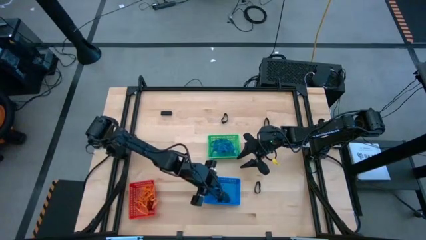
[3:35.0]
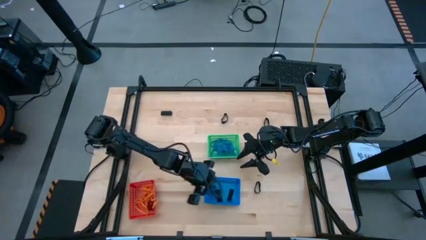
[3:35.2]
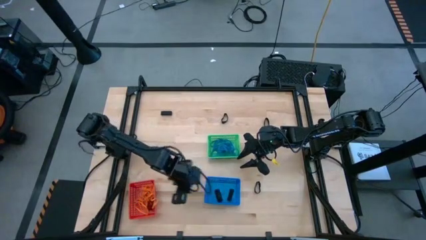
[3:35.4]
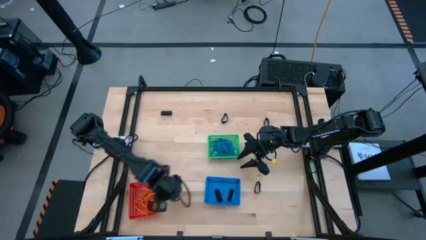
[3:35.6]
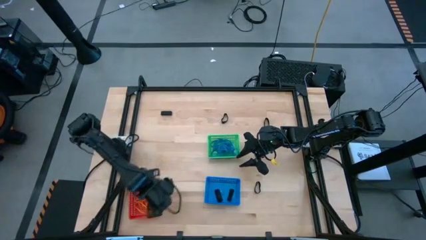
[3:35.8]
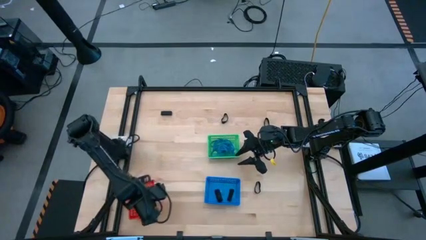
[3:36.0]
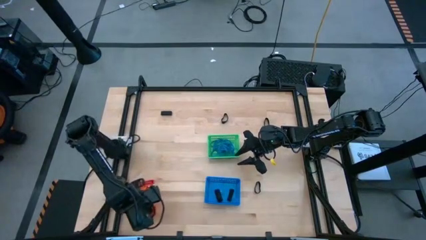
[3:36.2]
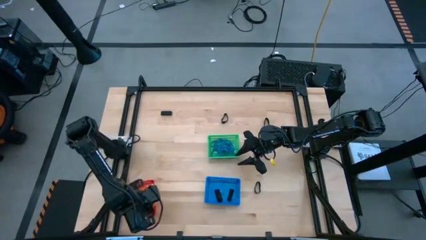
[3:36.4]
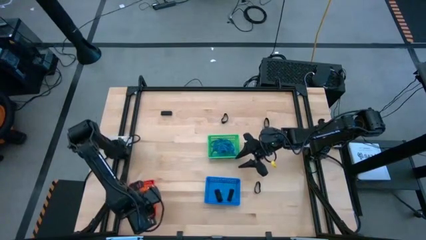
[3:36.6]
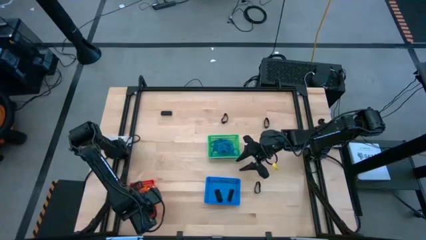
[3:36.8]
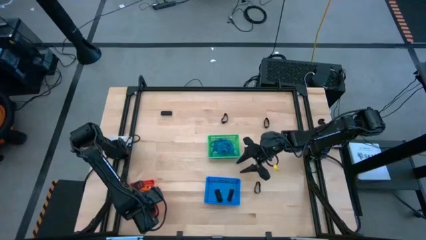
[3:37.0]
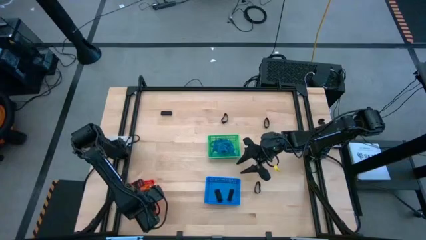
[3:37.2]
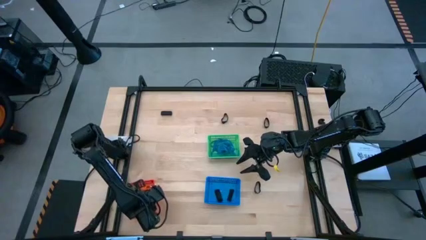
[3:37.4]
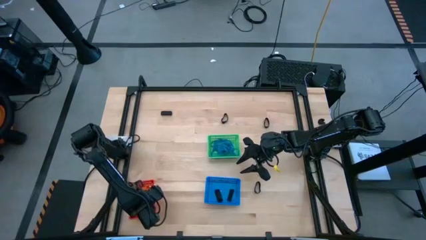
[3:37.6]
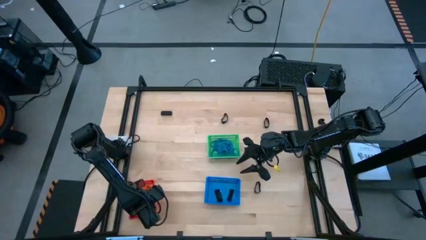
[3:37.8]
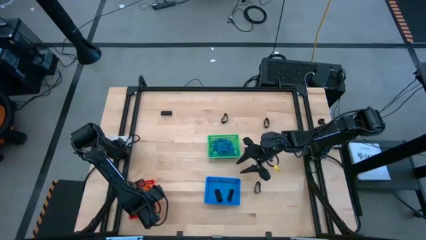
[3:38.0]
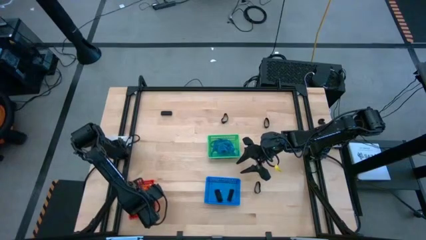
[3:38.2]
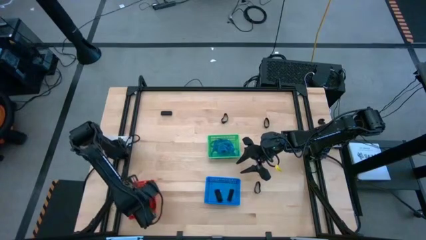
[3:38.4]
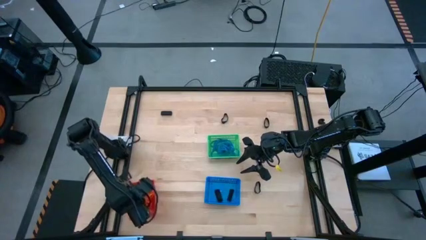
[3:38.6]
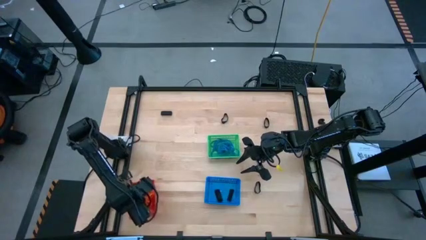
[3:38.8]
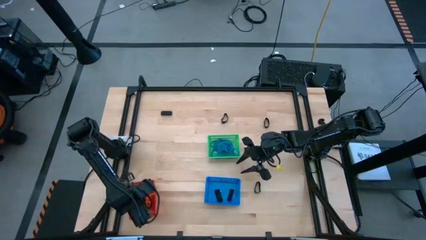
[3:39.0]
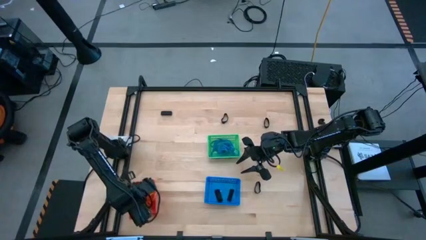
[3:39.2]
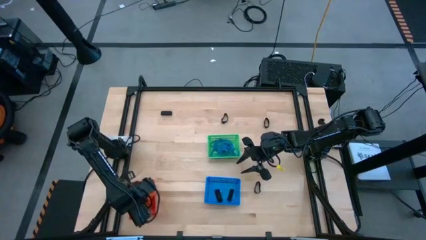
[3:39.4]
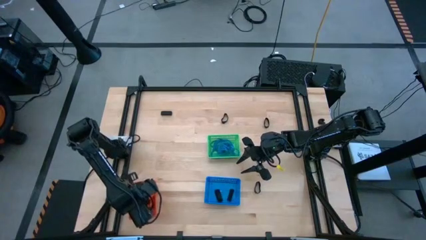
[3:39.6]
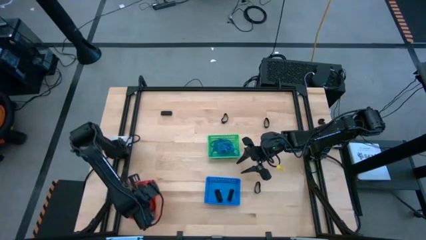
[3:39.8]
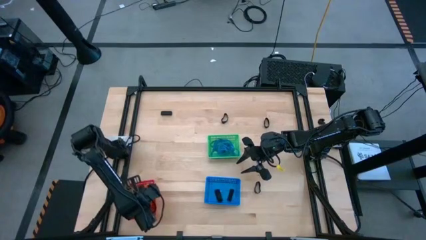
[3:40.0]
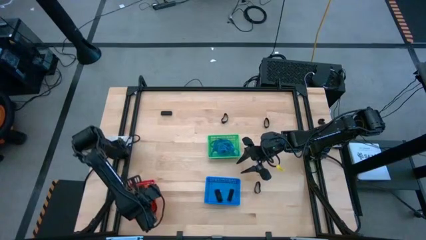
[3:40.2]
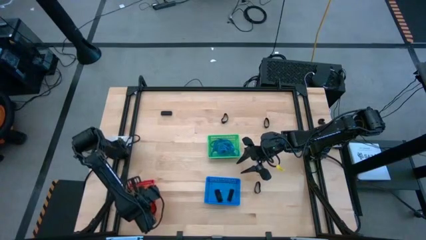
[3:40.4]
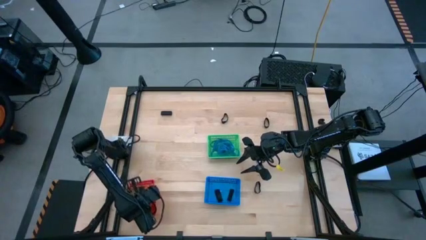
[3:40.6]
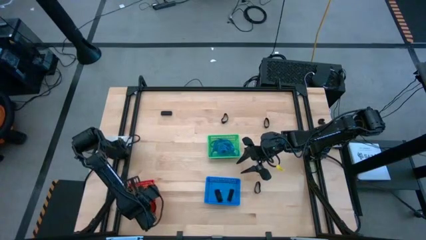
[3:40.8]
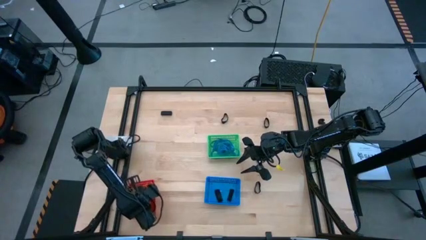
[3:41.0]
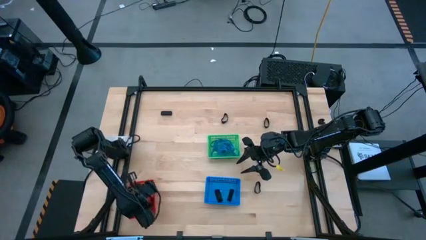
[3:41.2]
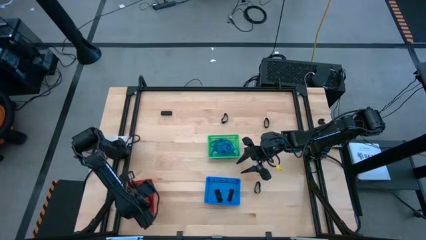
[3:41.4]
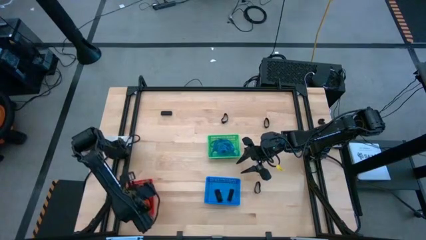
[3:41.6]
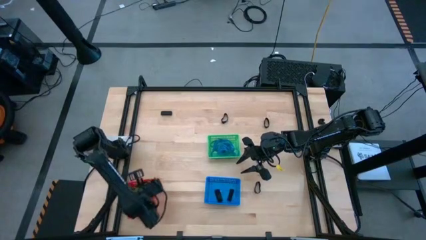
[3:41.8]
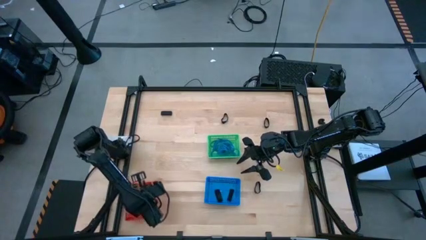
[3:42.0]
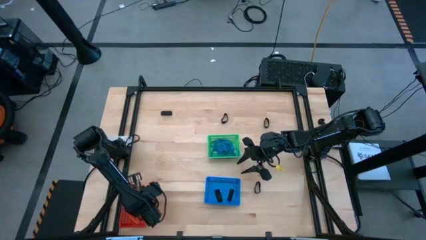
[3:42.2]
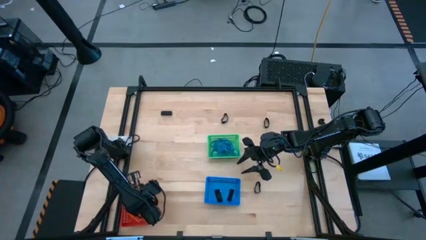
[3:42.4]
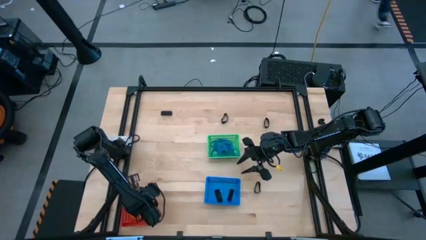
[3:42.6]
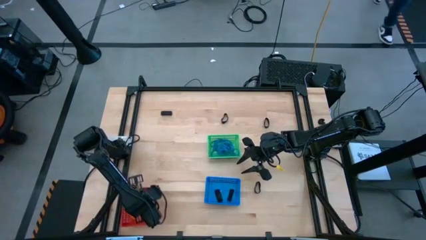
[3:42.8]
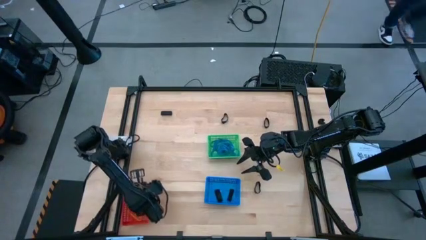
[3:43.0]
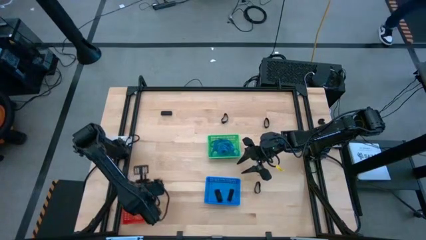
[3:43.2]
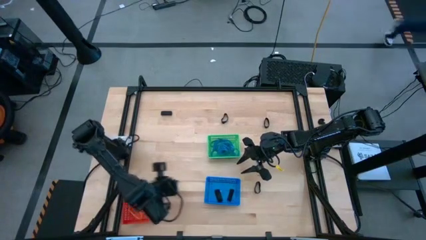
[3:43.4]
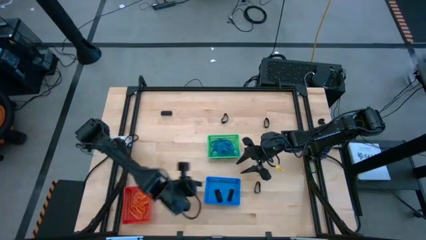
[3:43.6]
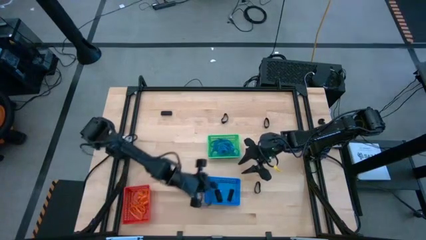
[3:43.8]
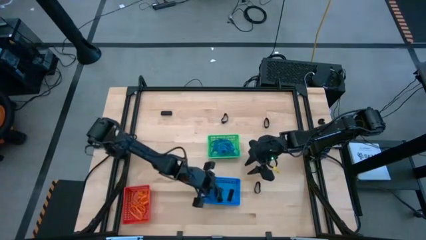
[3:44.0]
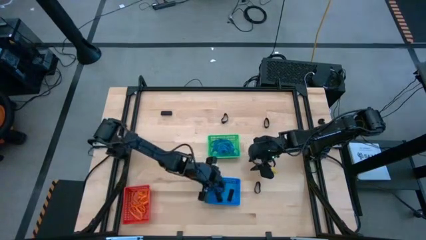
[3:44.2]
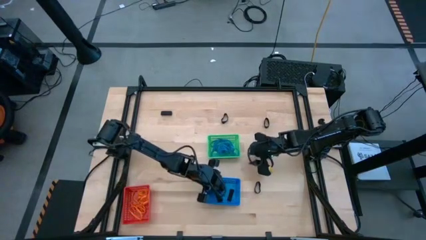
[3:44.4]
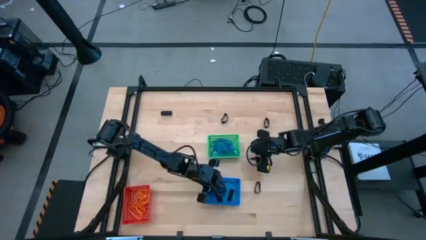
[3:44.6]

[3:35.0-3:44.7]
Task: Sort rubber bands into baskets
Put the black rubberband into the blue bin

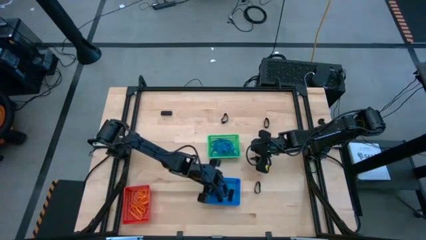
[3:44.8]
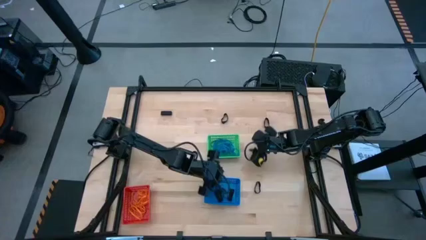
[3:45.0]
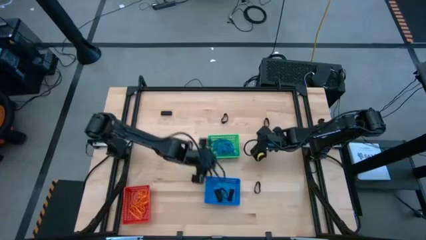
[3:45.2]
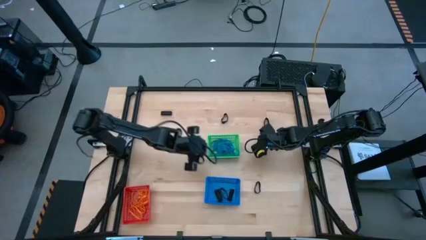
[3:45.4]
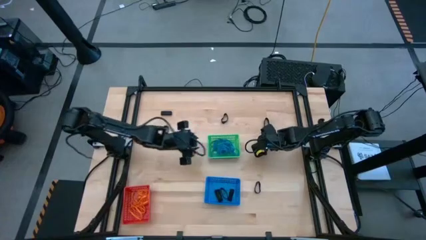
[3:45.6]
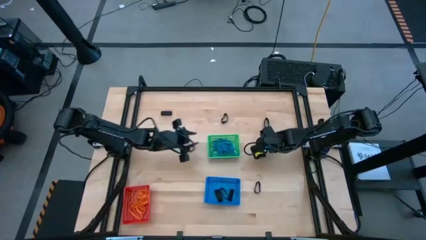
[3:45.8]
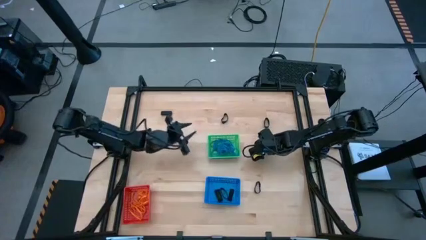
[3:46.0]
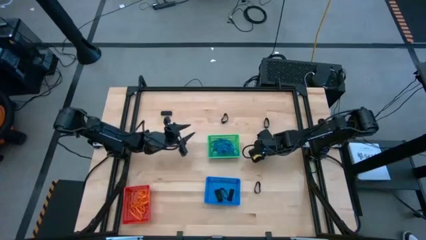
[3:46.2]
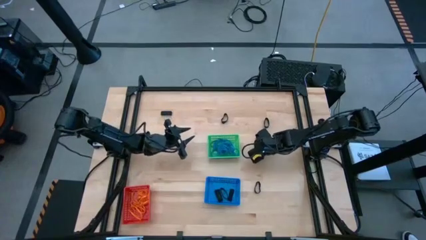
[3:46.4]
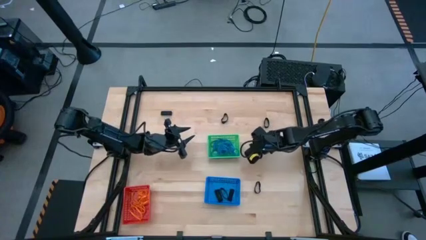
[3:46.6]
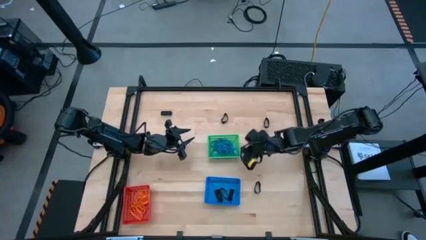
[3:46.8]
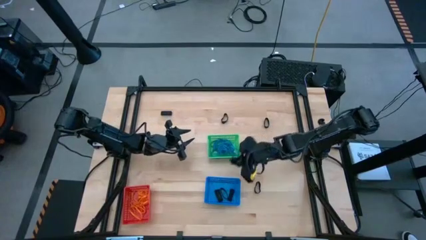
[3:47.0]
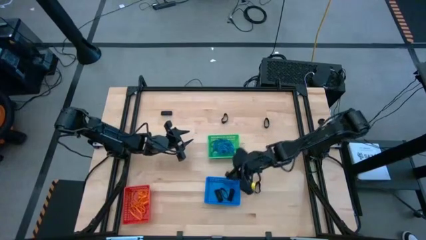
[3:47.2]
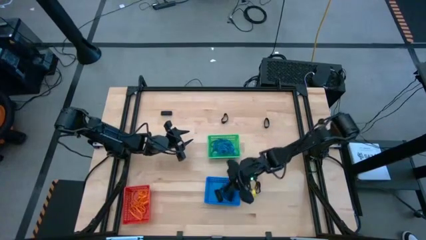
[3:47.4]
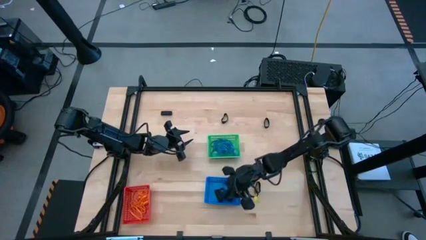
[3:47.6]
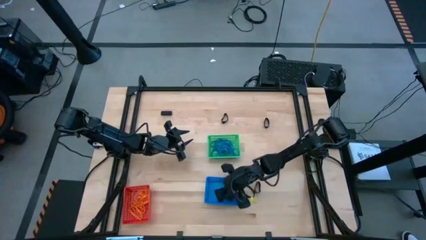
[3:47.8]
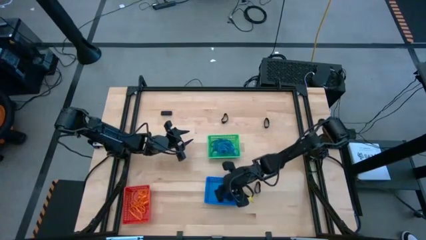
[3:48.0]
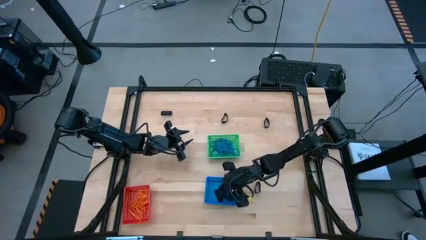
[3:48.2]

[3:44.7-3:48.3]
Put the black rubberband into the blue bin

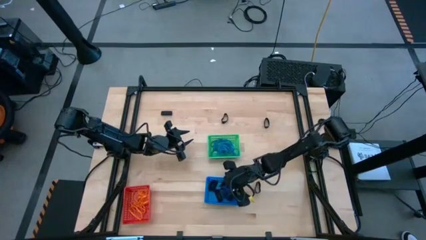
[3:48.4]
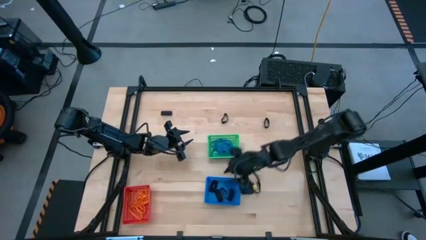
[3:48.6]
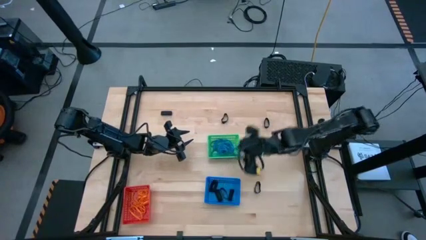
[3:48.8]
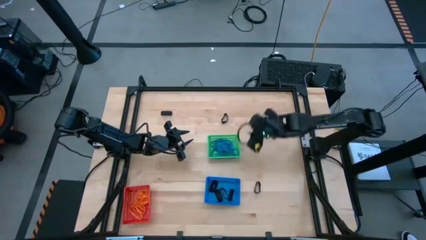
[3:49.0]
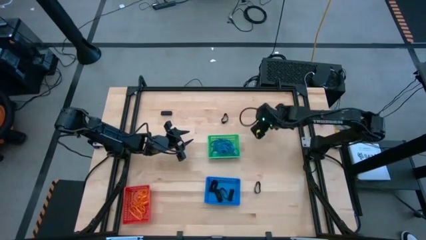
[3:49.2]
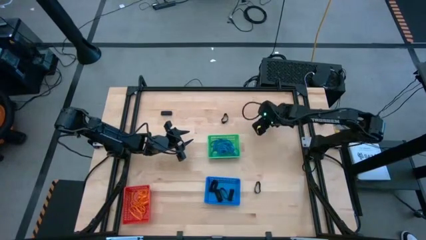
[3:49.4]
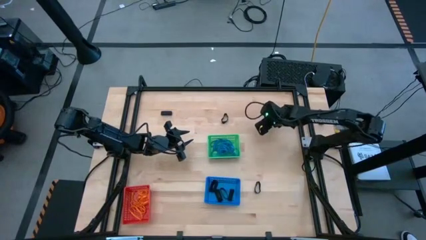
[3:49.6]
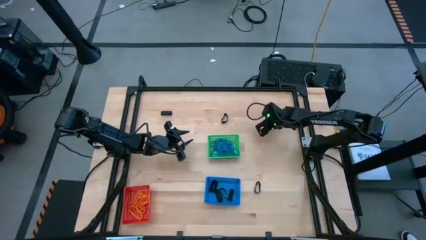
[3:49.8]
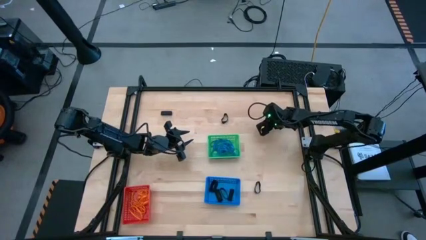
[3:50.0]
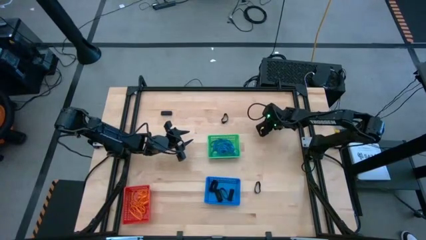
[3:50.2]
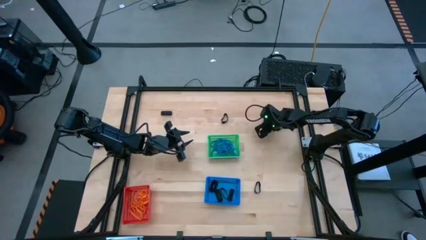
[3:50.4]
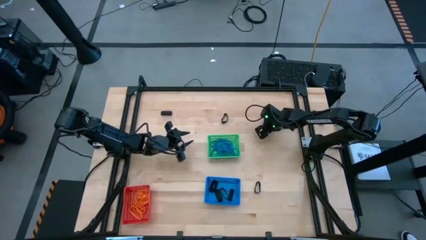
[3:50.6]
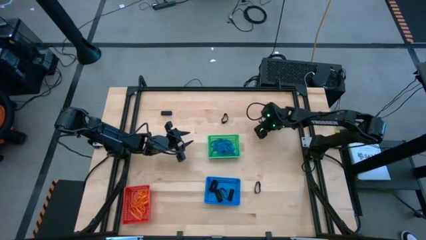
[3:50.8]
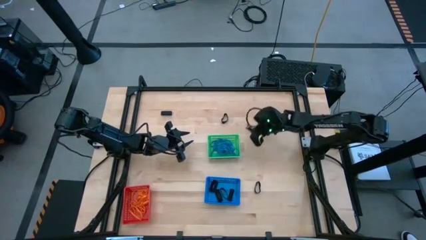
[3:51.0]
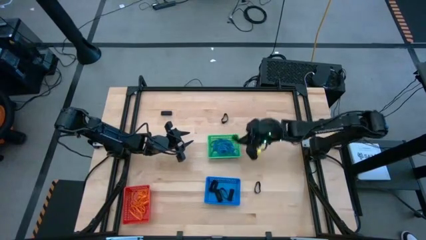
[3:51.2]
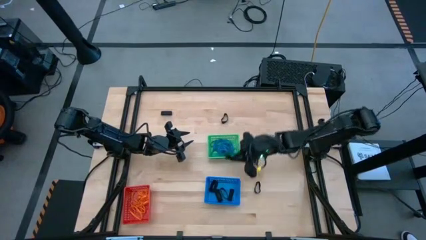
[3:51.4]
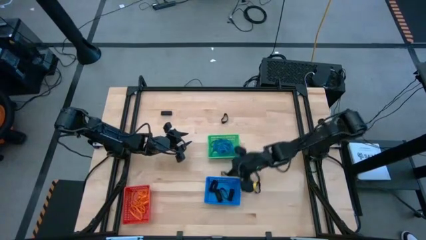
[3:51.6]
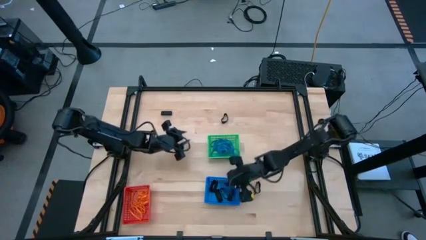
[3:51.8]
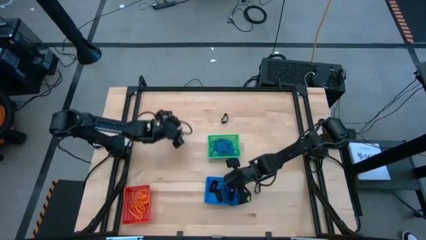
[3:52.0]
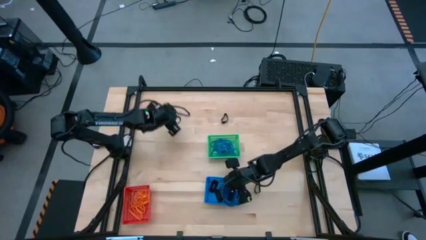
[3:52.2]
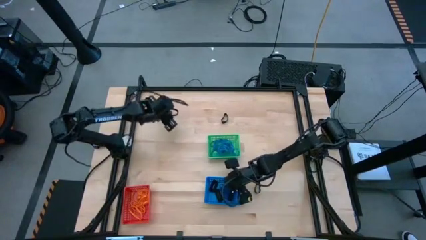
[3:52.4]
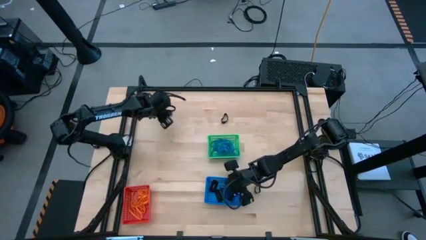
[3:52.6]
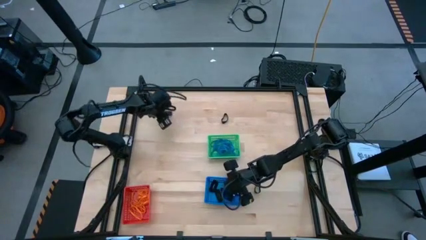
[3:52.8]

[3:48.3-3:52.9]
Put the black rubberband into the blue bin
